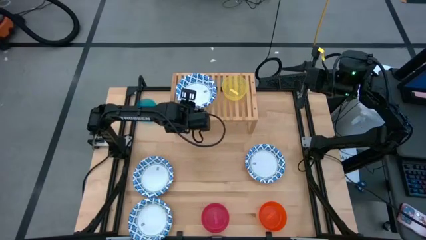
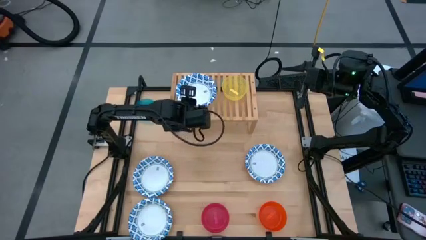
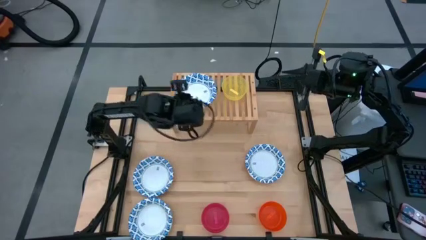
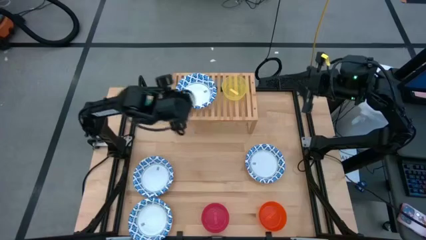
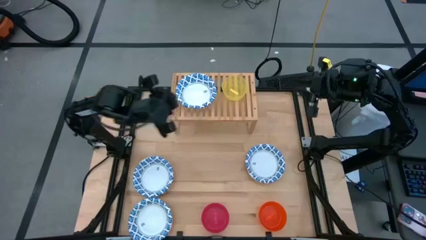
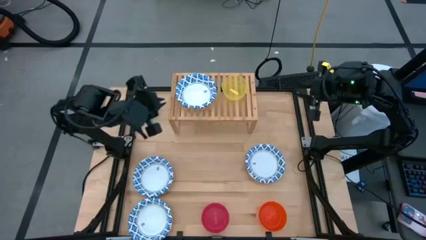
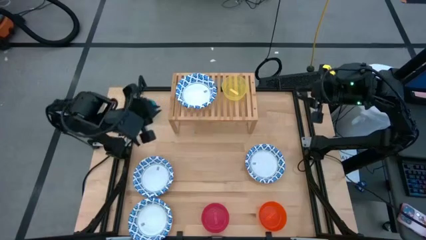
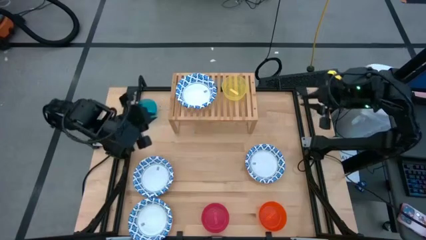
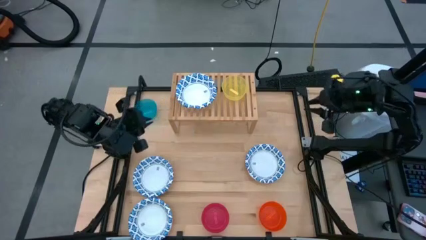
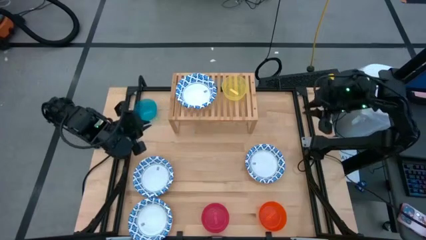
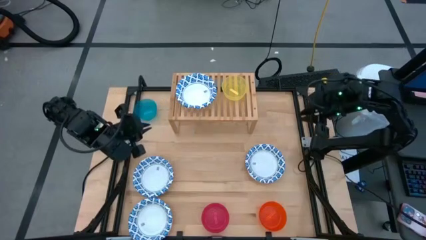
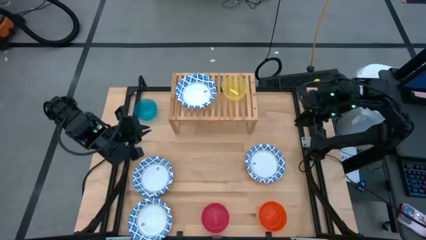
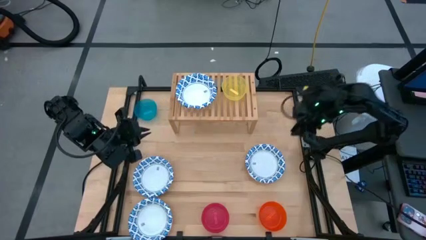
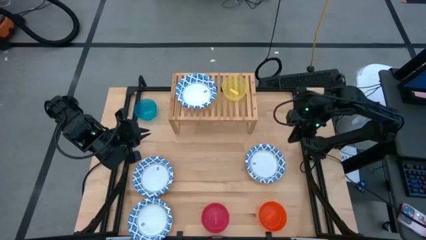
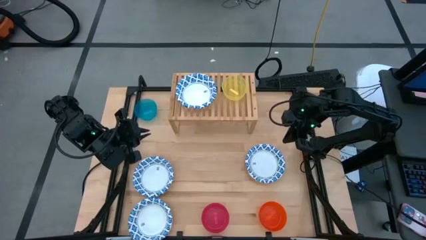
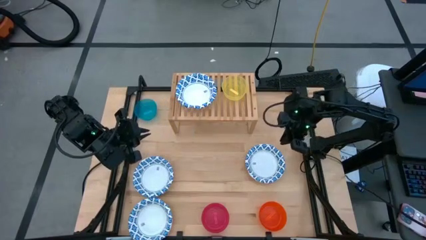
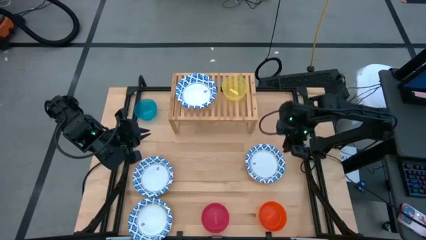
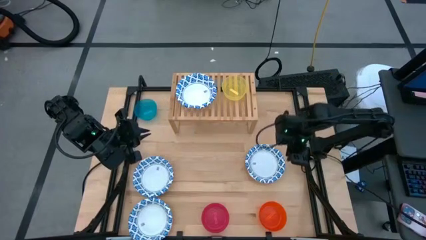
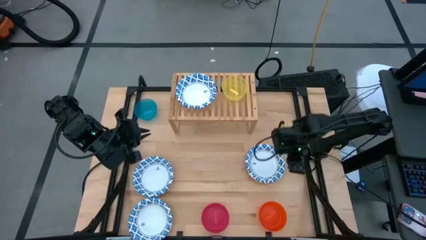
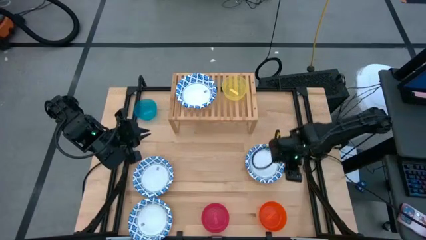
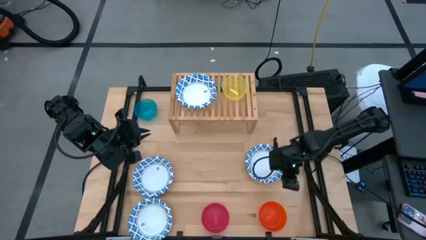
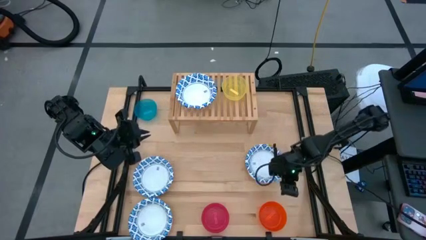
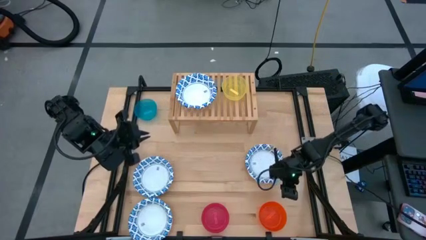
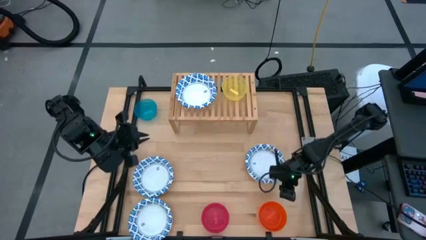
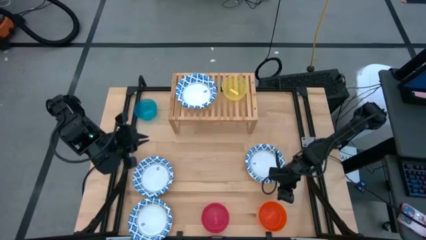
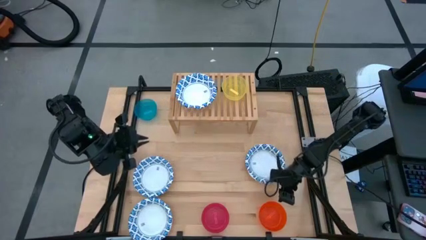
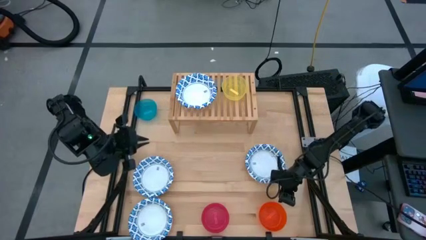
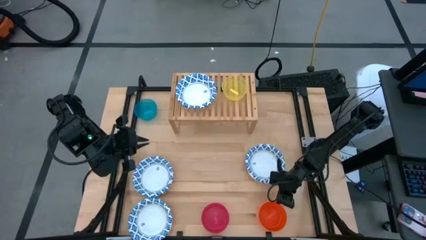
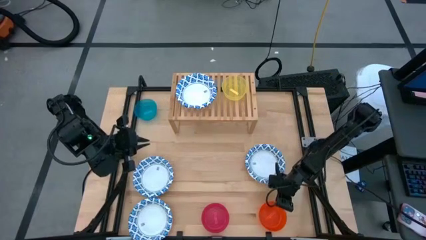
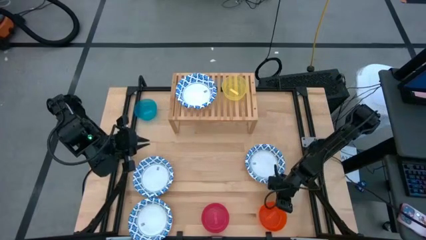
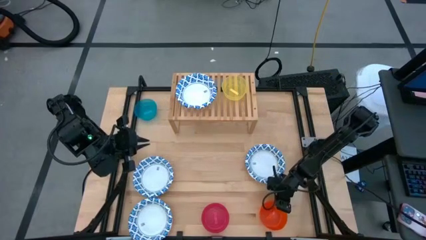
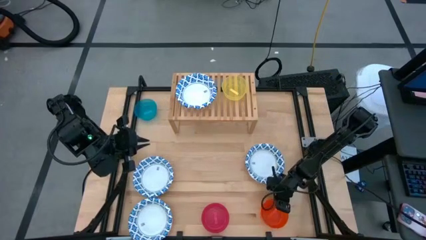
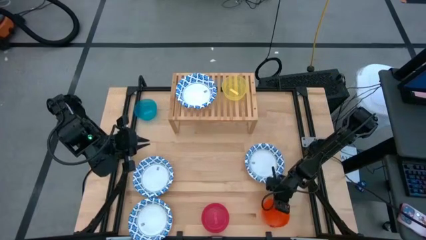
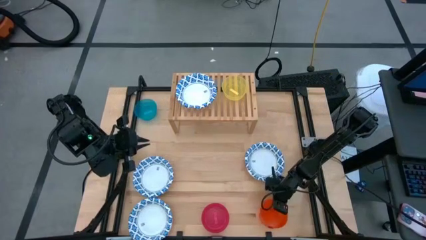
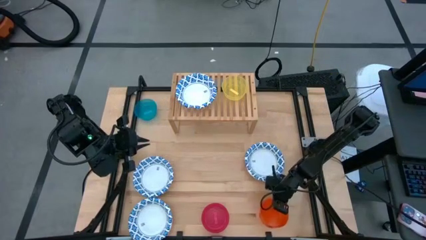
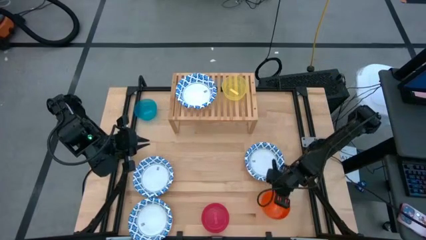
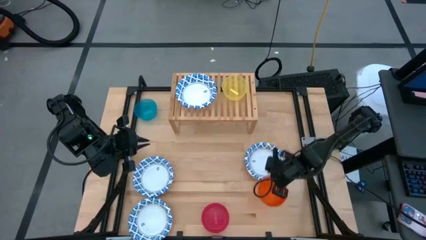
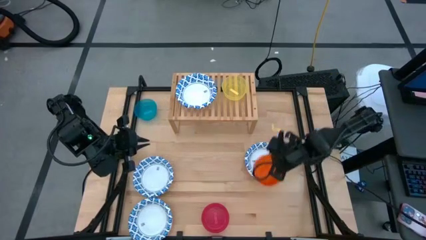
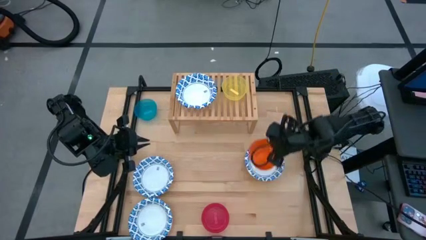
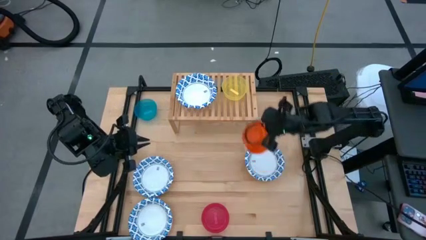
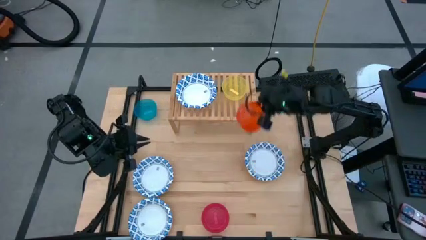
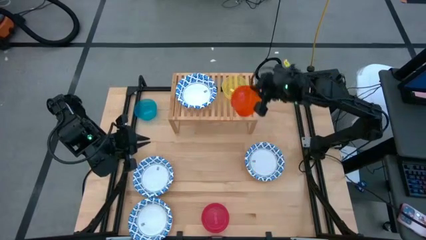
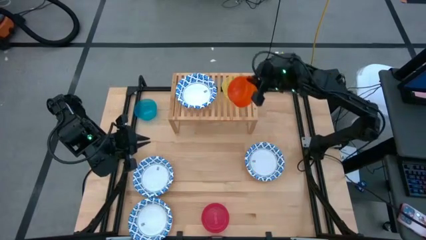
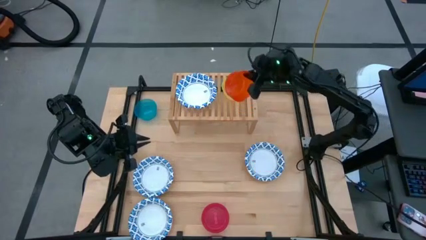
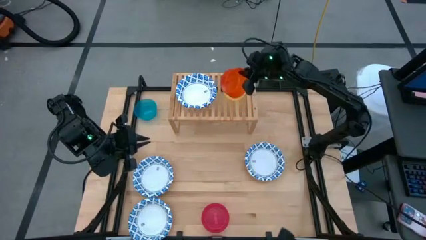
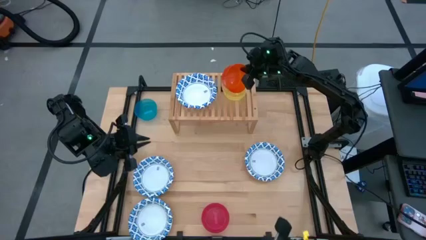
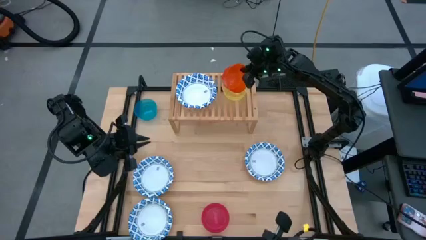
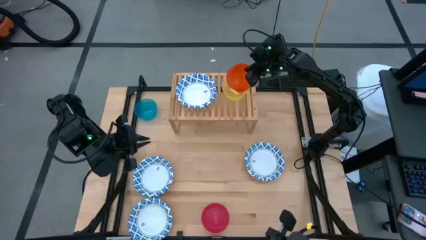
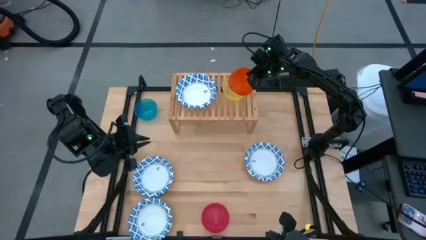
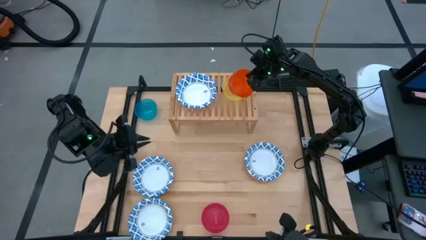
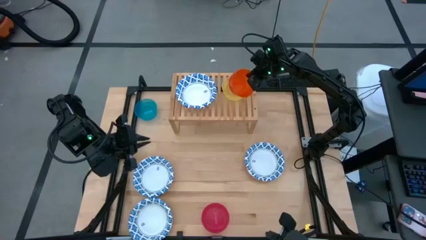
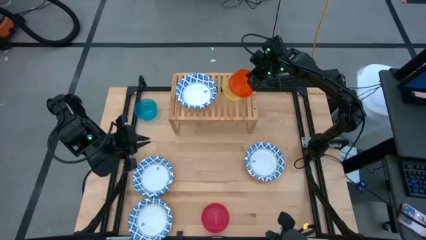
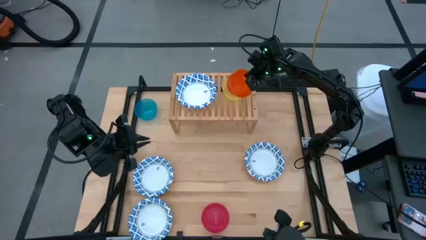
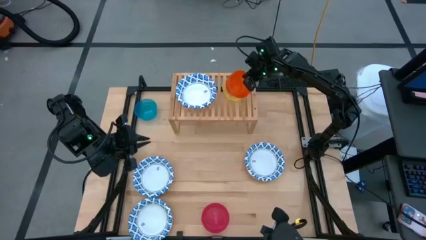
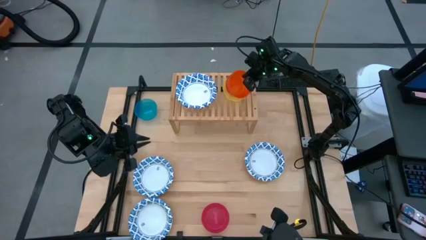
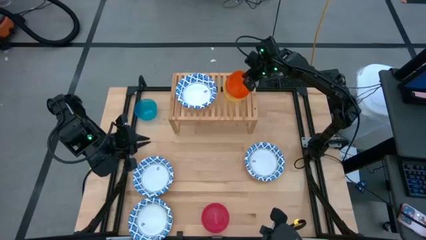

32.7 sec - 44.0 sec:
Task: Place and stack bowls onto a shelf
Stack the orange bowl on top of the yellow bowl on the shelf

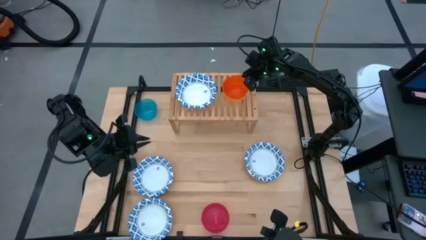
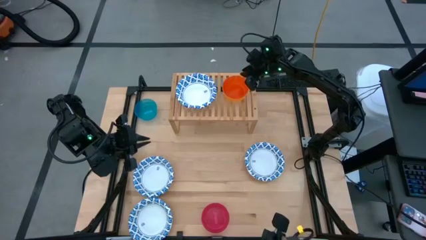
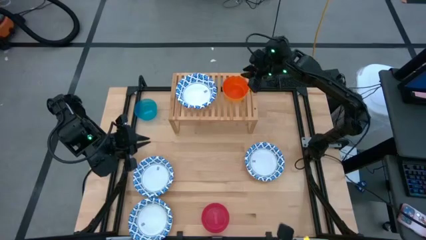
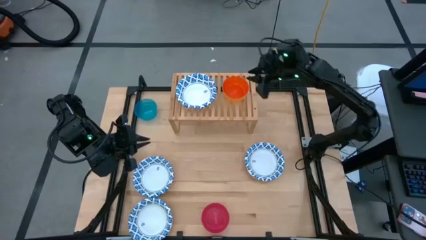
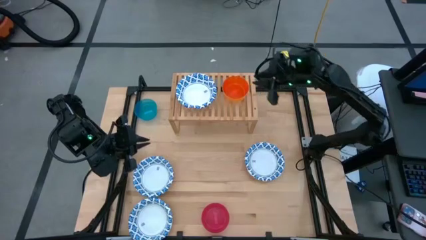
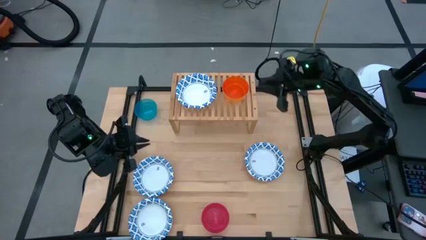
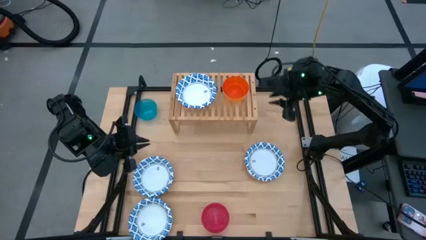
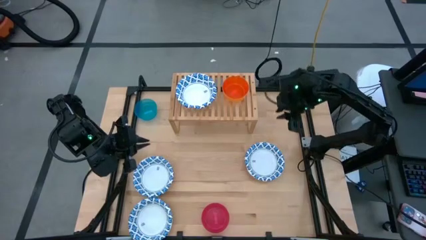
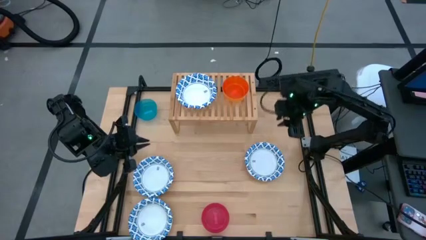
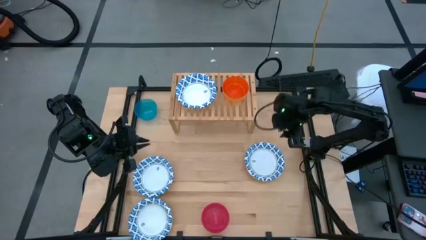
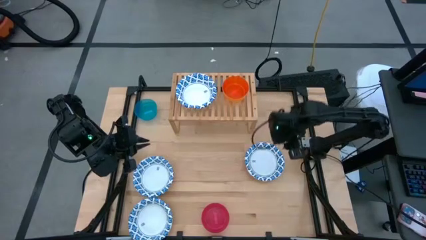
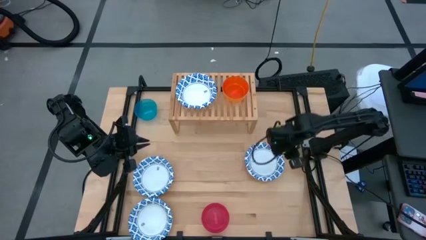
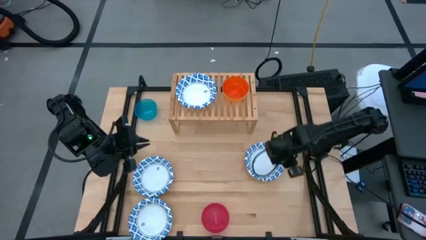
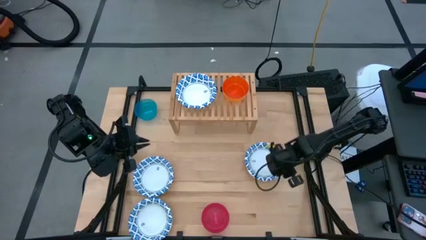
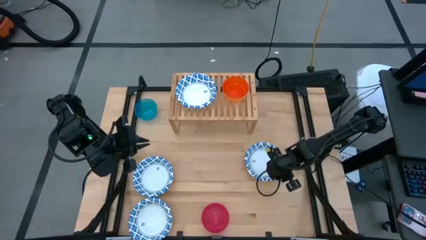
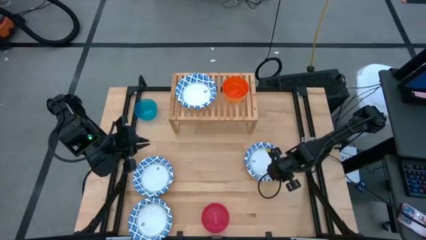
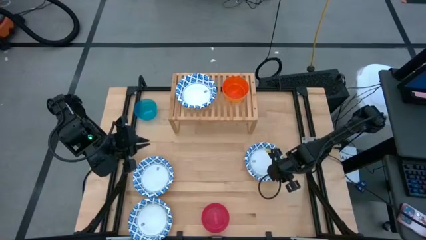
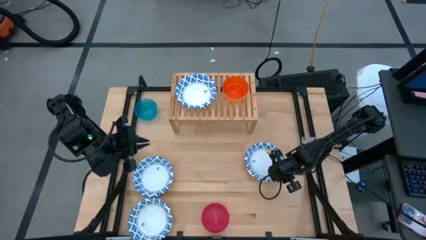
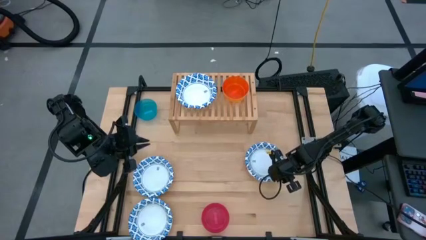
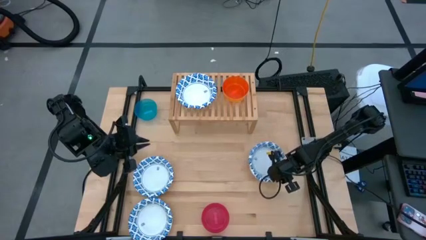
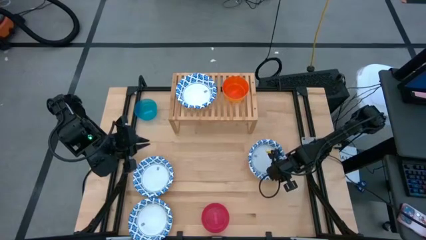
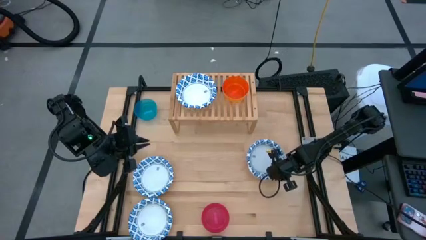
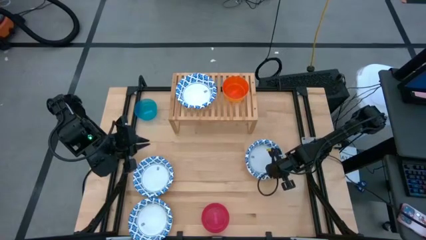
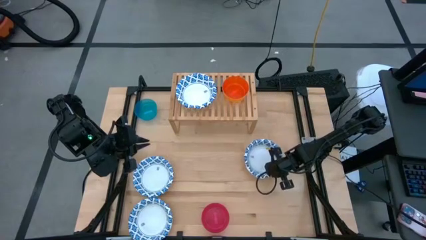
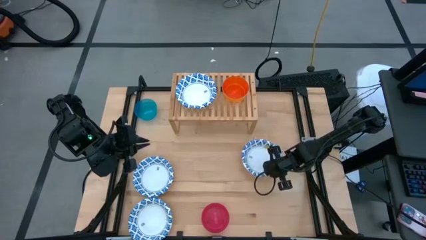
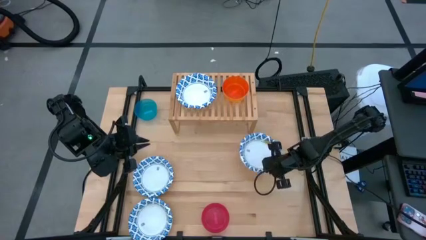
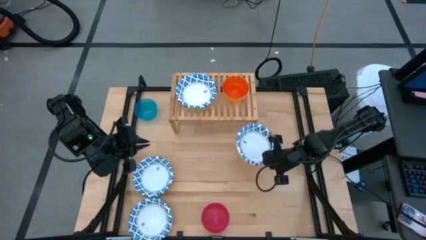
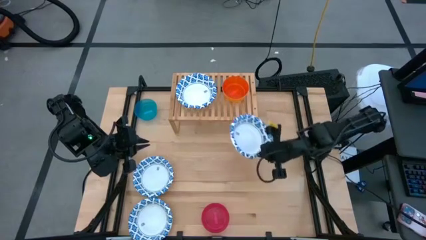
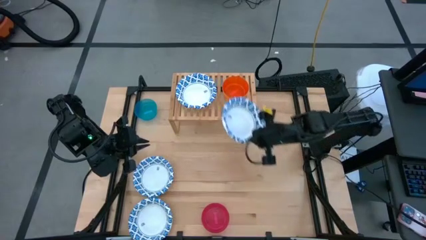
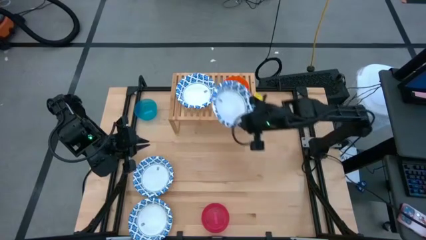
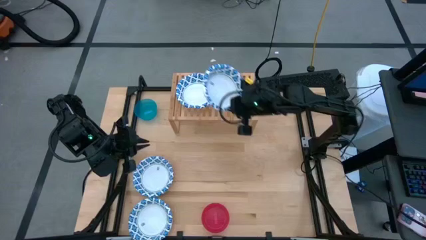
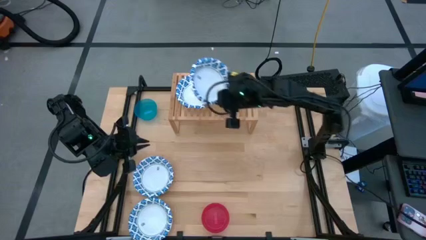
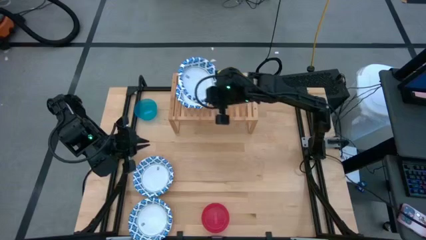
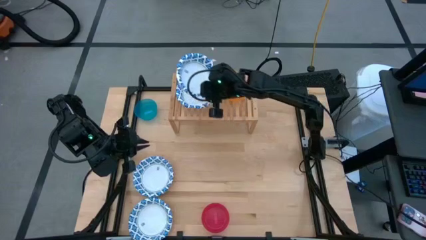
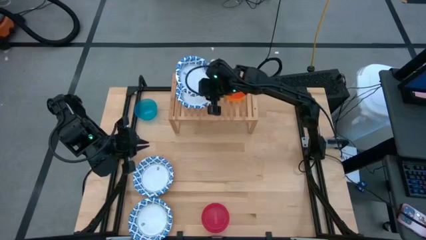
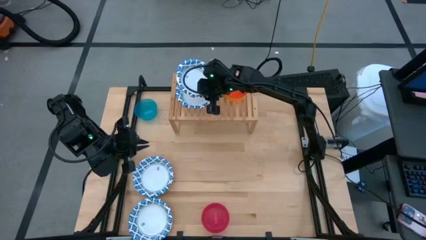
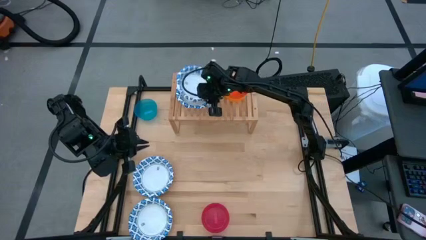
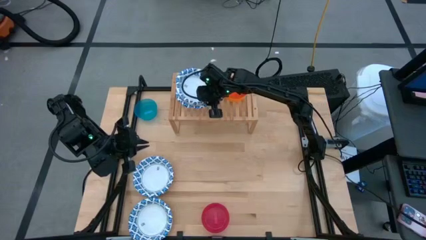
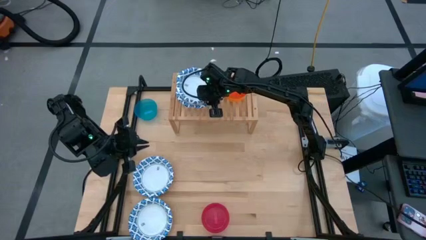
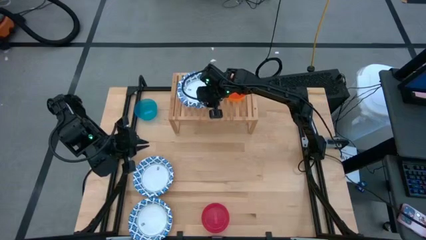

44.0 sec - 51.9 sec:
Stack the top right white patterned bowl on top of the white patterned bowl on the shelf
